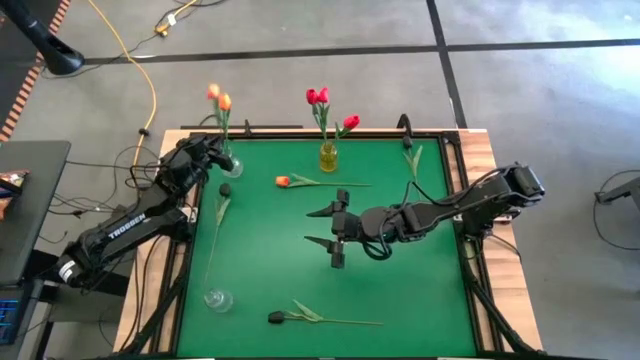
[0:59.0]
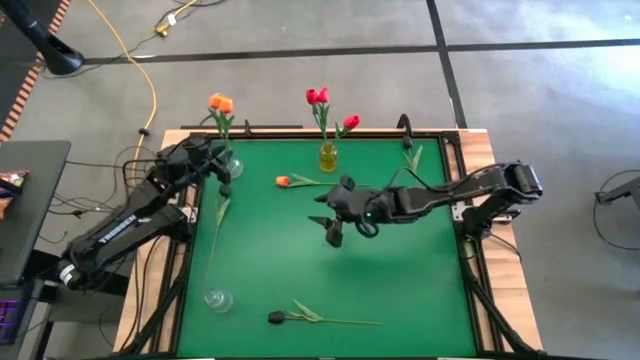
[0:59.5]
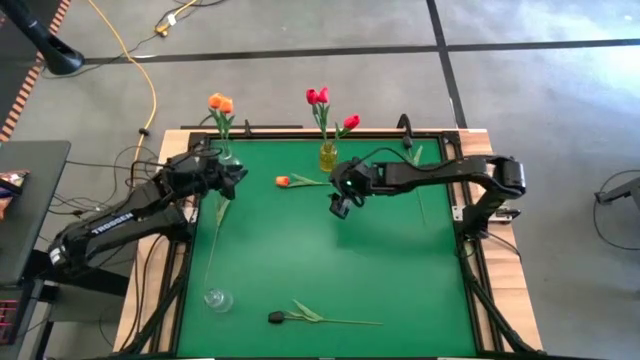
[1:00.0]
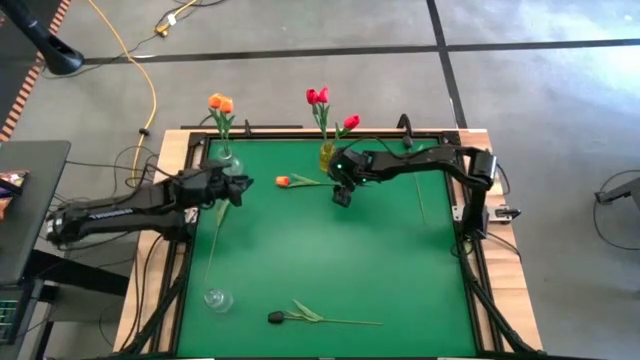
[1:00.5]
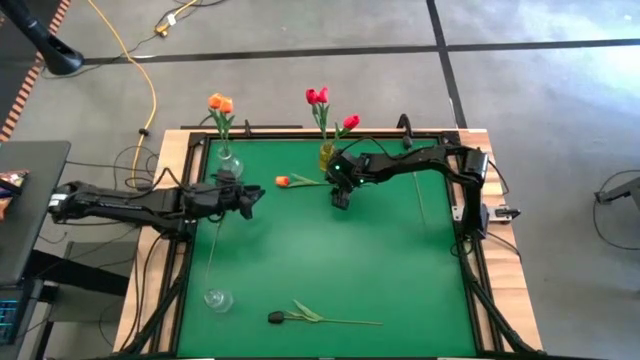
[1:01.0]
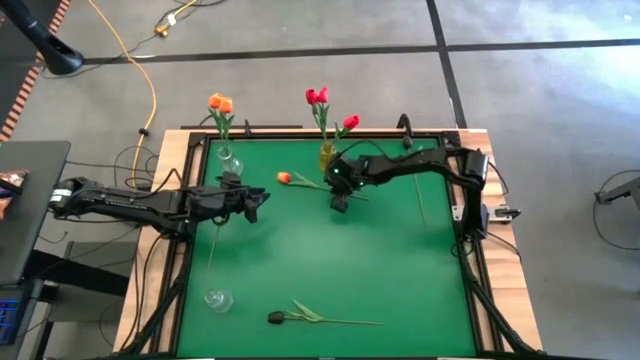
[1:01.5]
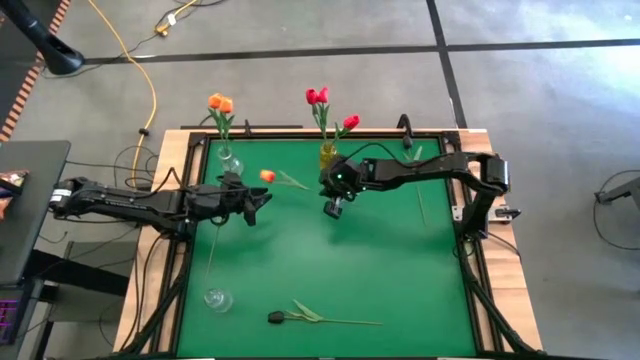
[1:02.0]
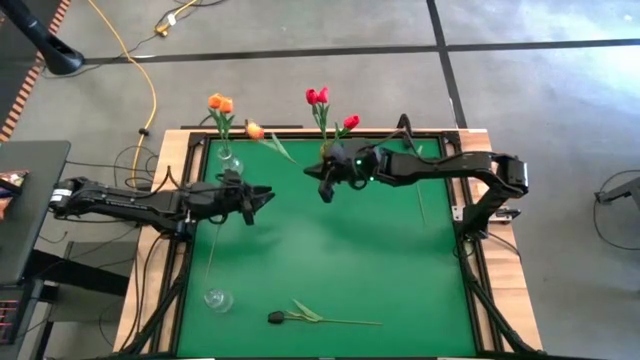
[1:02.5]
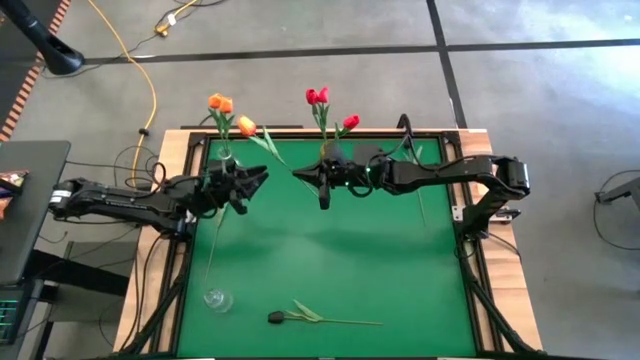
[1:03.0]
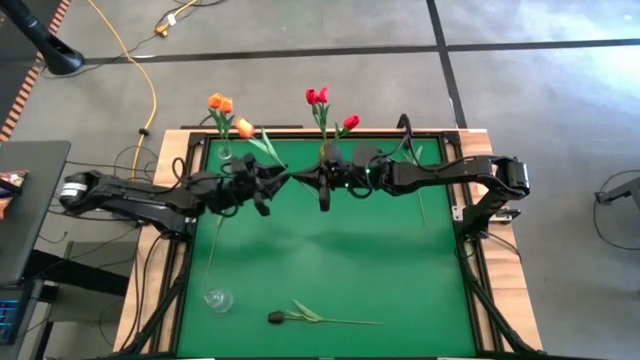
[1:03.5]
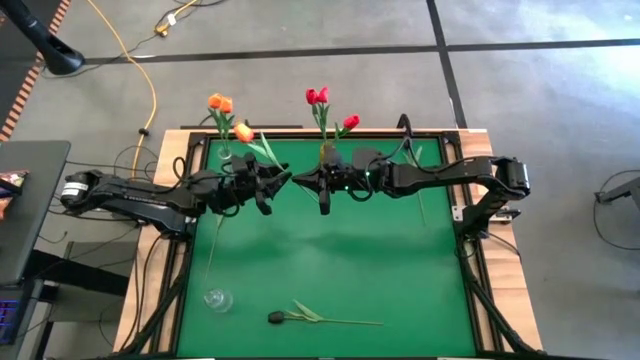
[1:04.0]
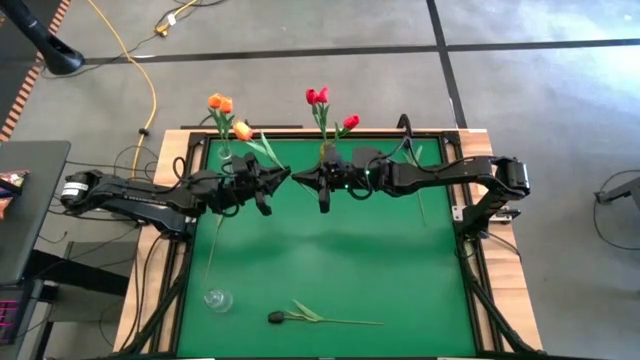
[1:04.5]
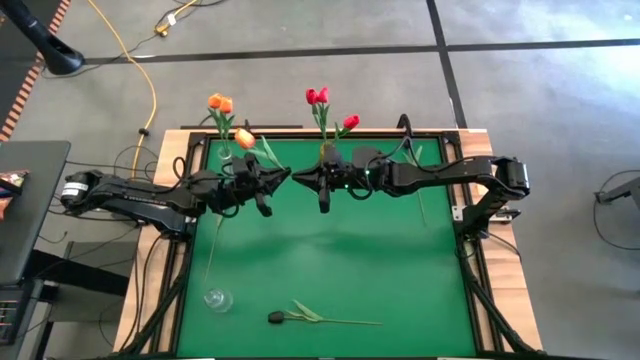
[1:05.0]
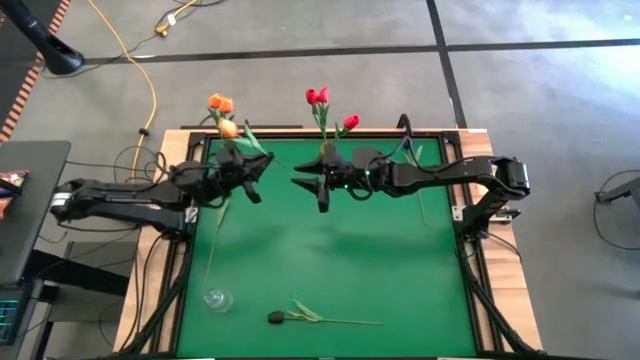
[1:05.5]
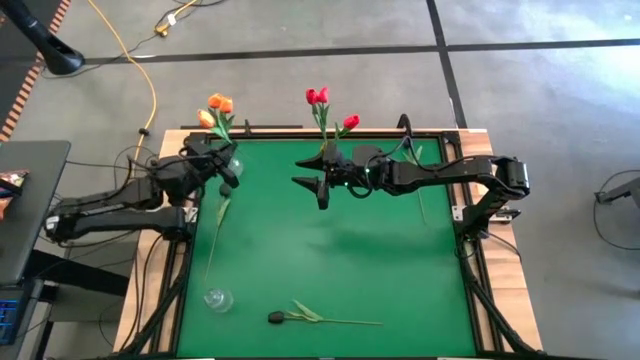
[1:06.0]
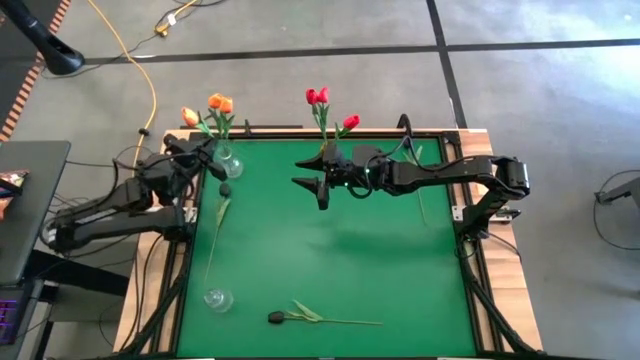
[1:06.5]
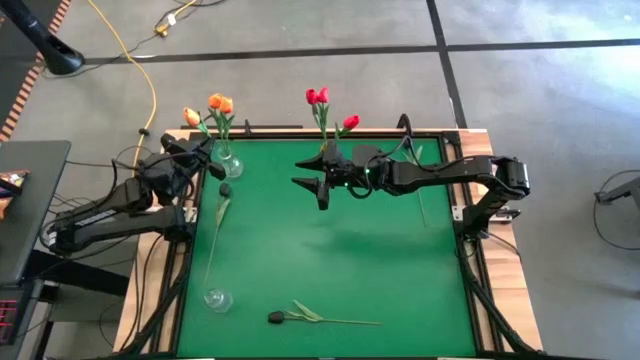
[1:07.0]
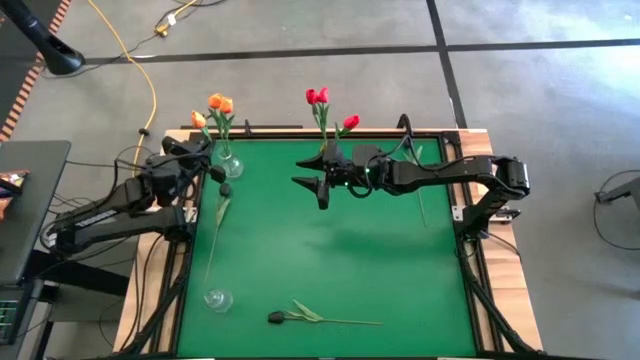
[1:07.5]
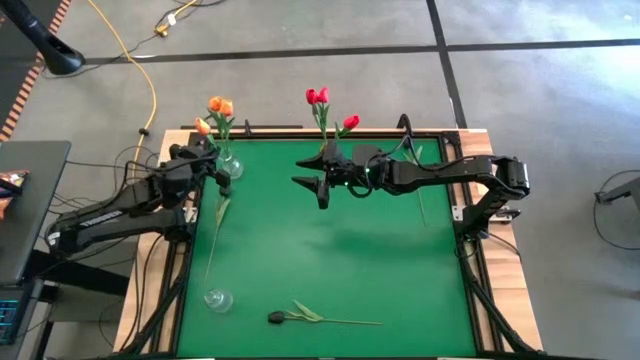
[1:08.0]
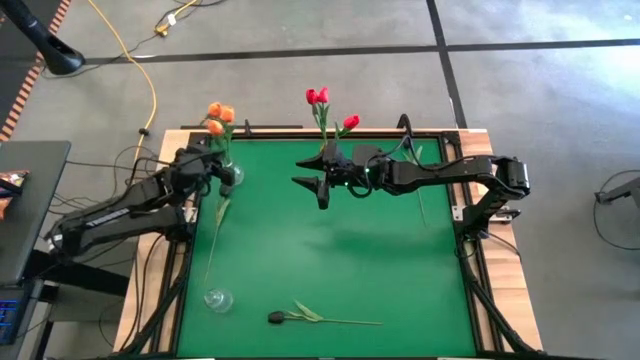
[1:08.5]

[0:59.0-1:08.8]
Task: Sort flowers into vase by color
Put the orange flower into the top transparent vase

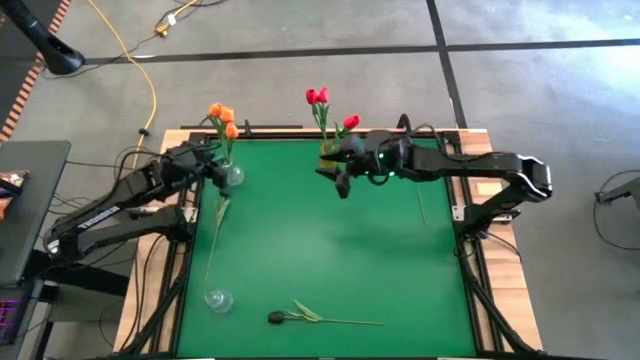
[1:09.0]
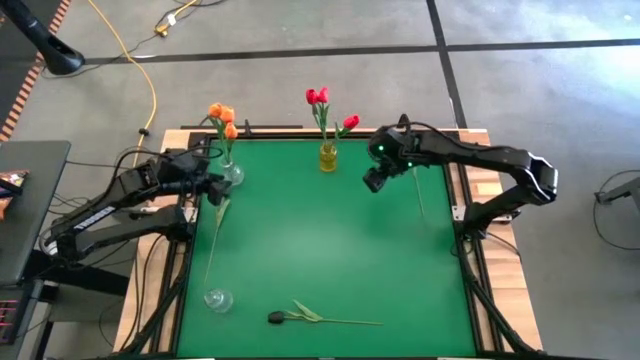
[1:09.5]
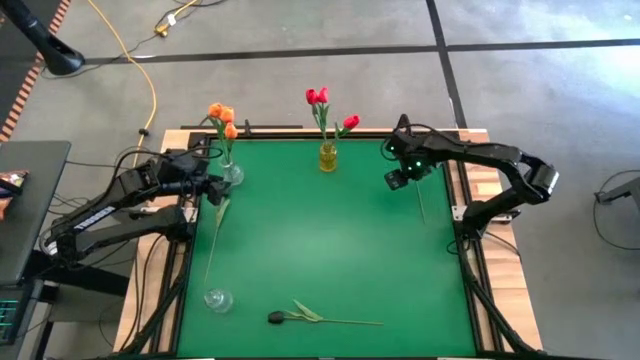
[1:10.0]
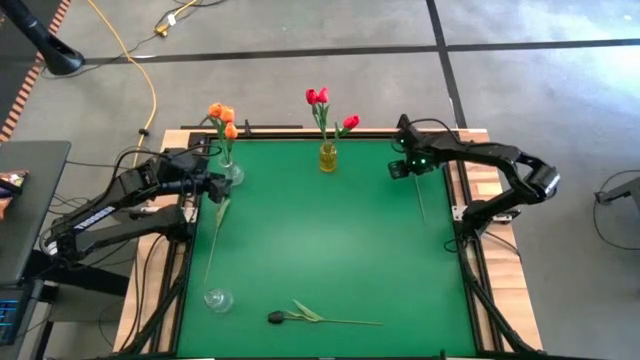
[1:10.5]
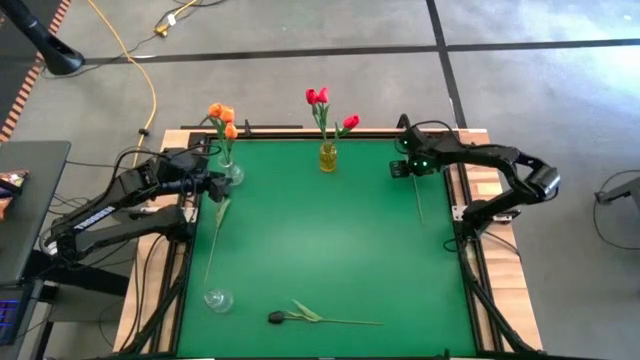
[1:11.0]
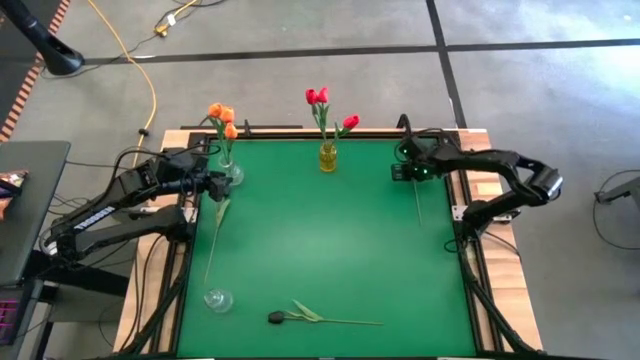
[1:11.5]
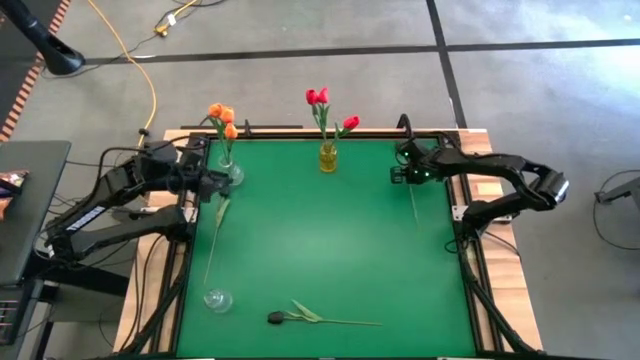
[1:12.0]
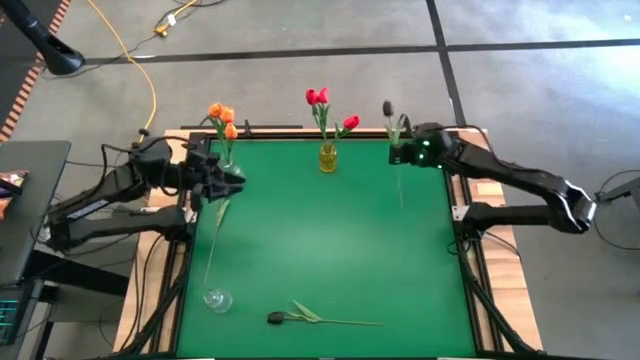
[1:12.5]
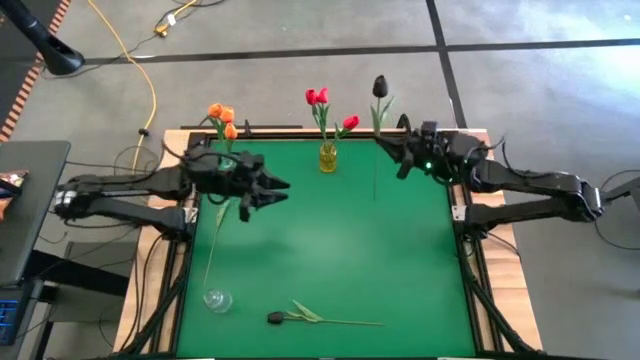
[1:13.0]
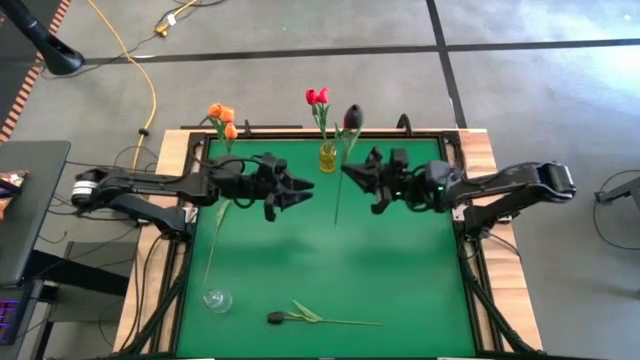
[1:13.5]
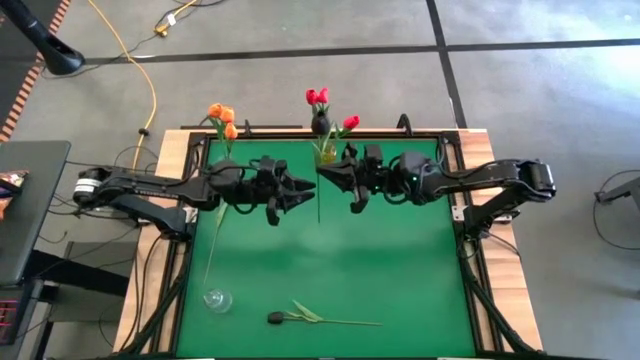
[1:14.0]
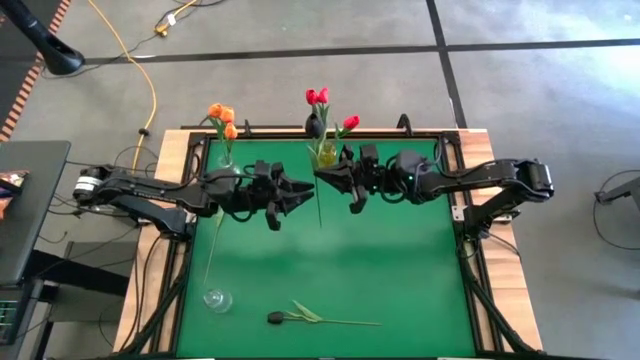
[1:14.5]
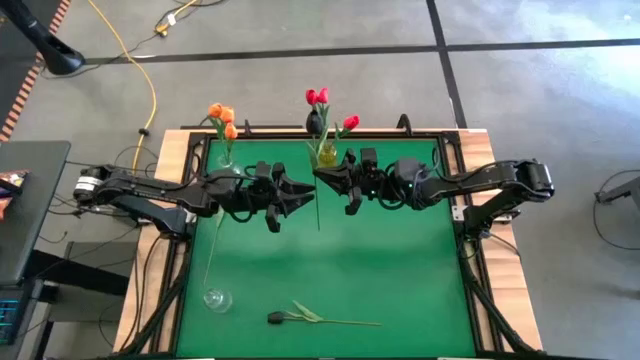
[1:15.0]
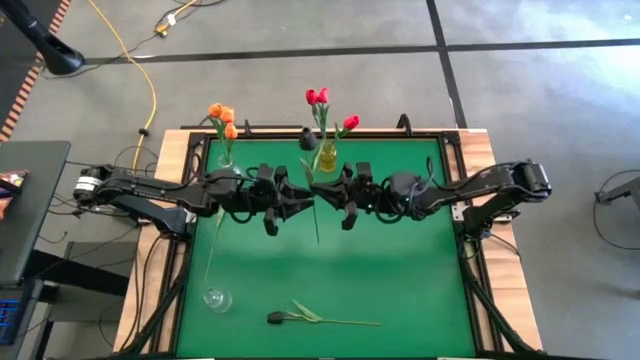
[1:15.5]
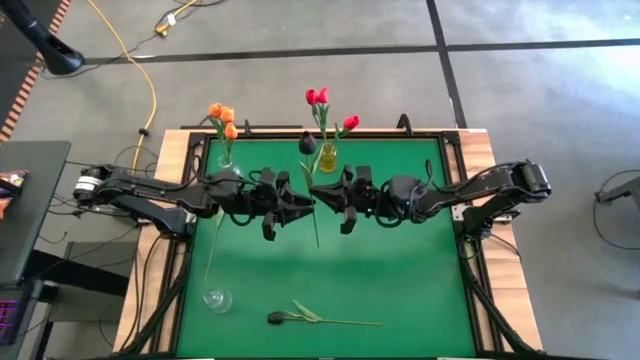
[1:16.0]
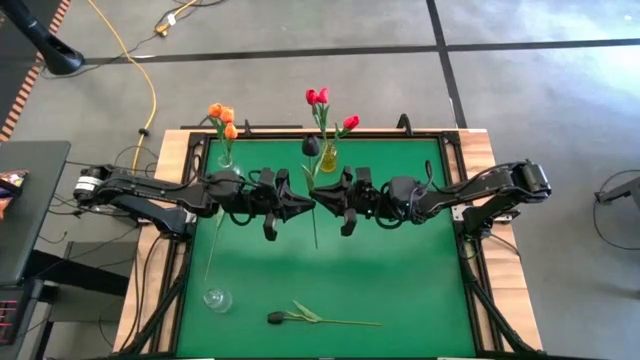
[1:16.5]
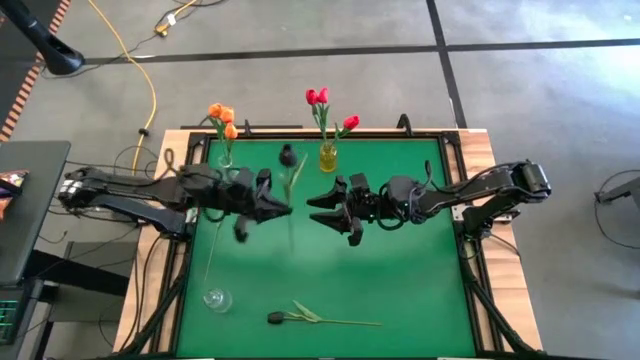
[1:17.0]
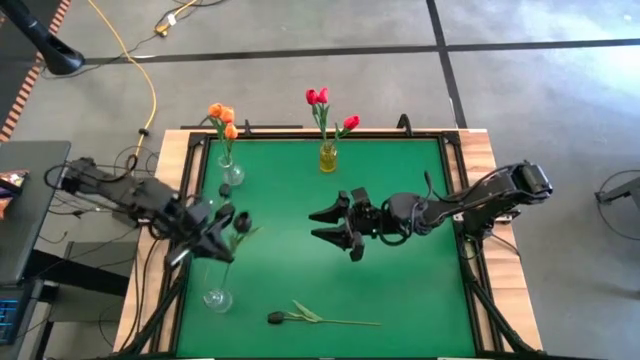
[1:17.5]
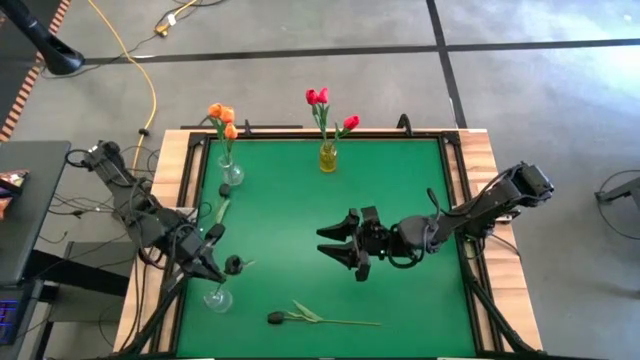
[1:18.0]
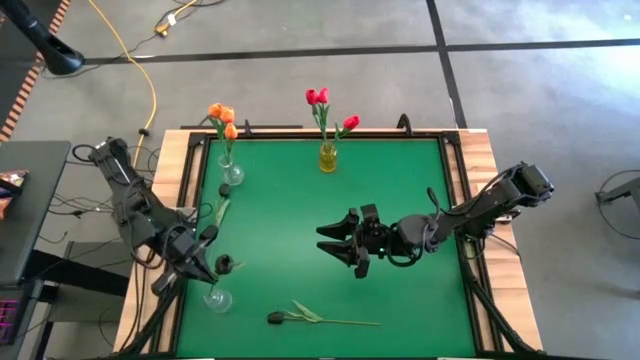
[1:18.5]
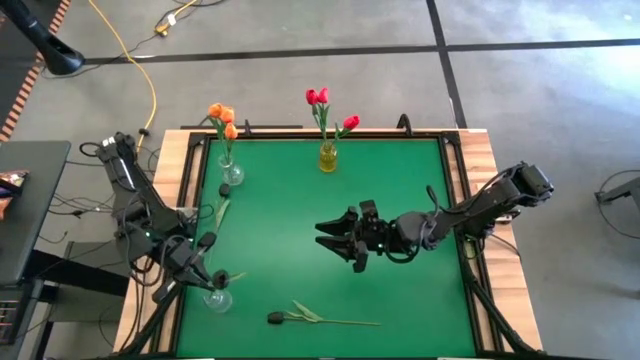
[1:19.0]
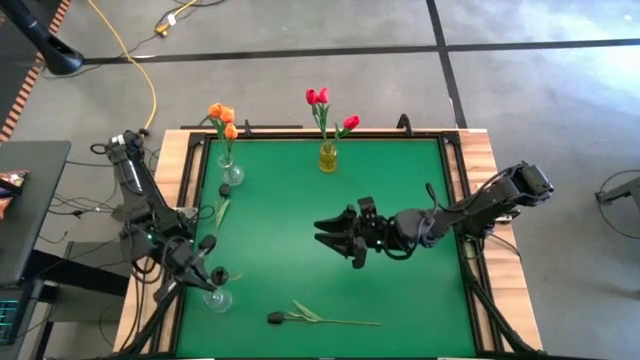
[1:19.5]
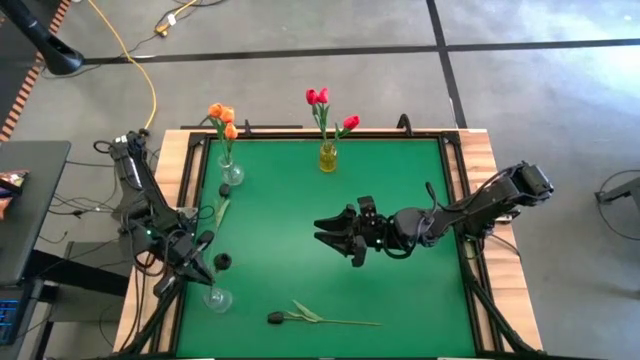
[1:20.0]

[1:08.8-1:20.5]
Put the top right black flower into the bottom transparent vase
